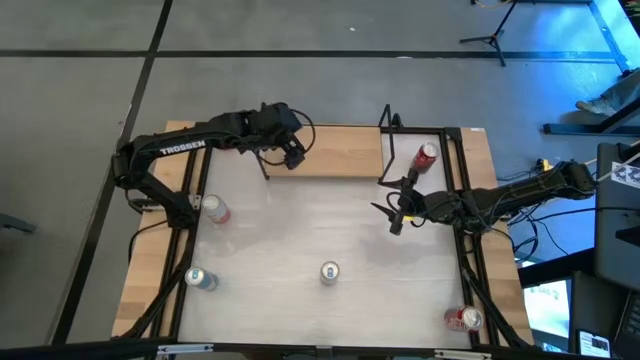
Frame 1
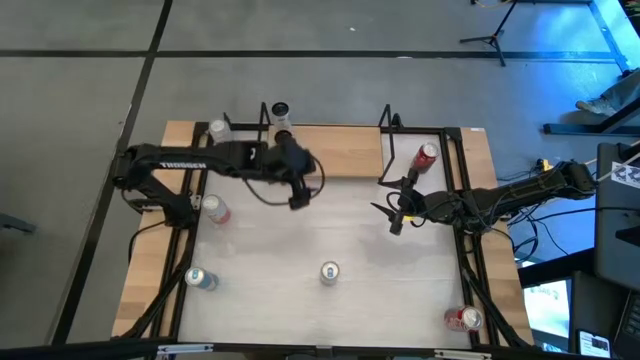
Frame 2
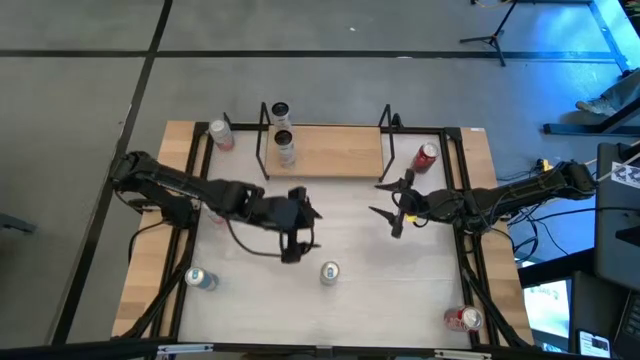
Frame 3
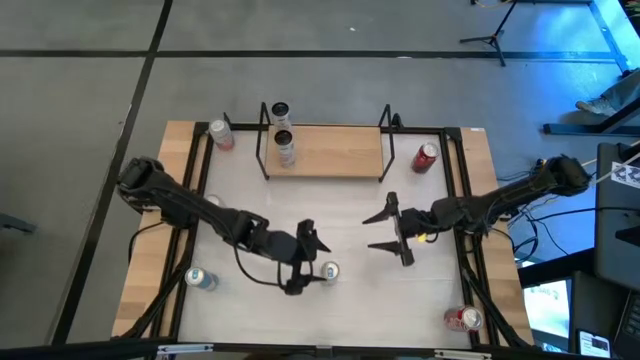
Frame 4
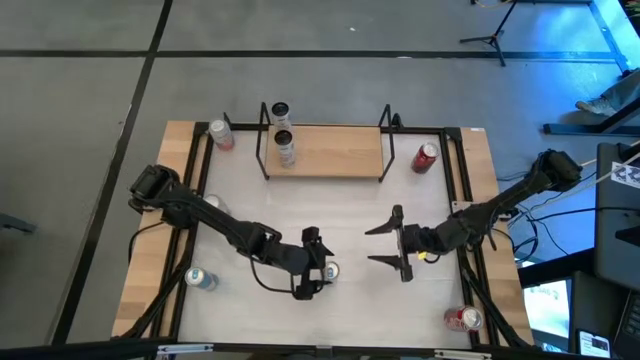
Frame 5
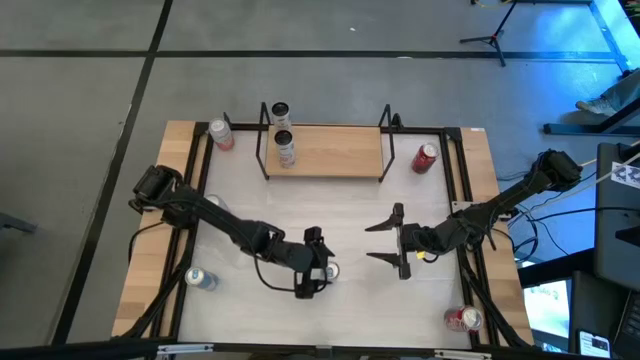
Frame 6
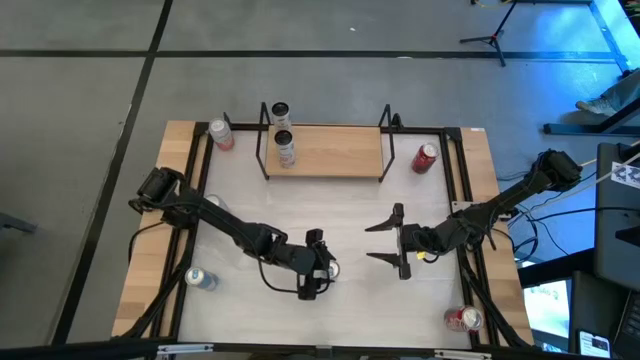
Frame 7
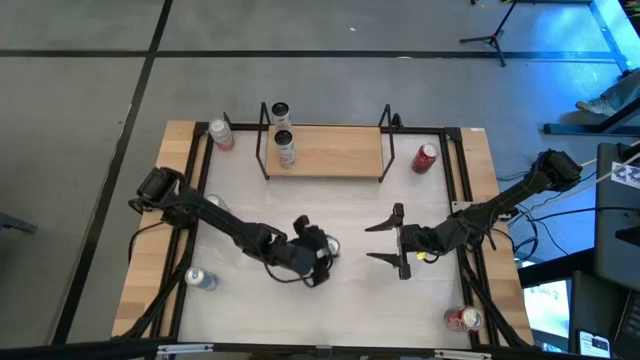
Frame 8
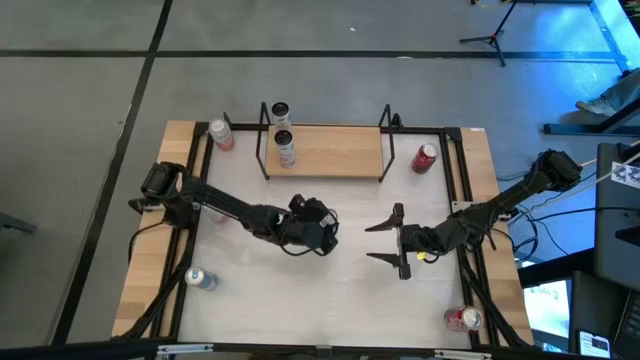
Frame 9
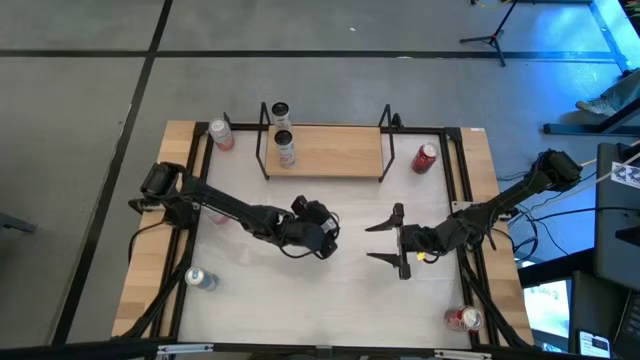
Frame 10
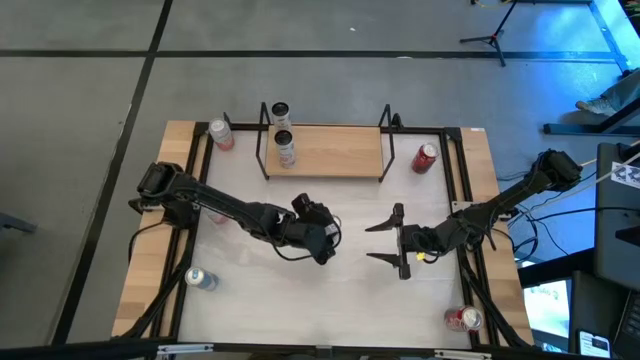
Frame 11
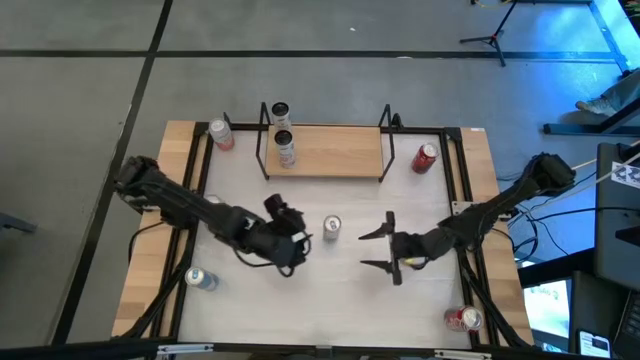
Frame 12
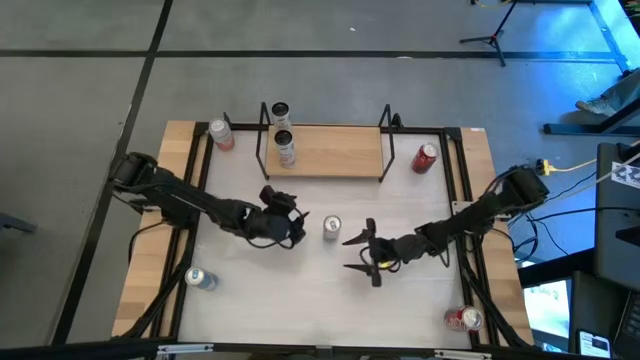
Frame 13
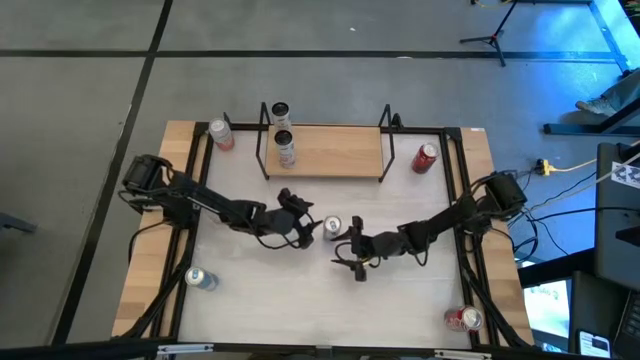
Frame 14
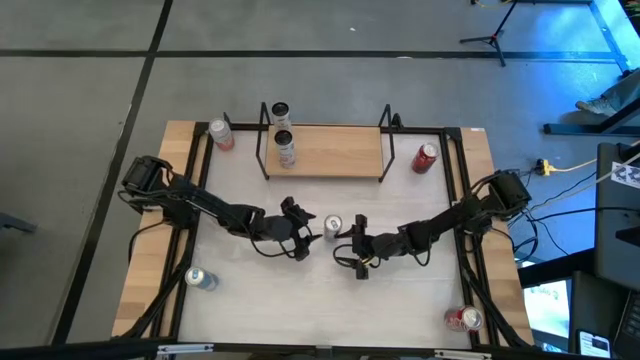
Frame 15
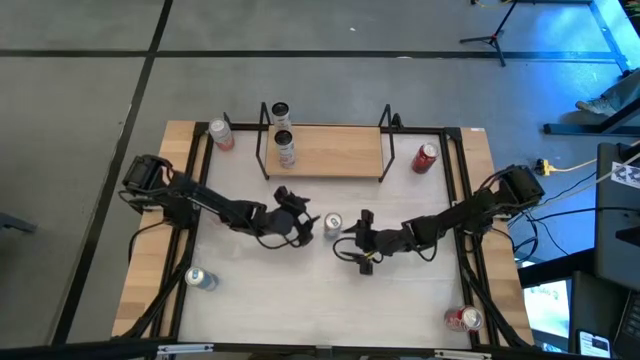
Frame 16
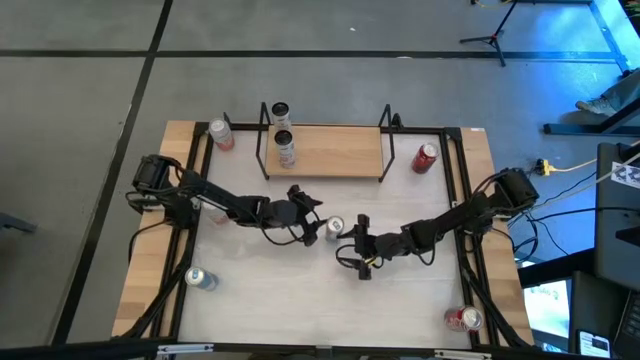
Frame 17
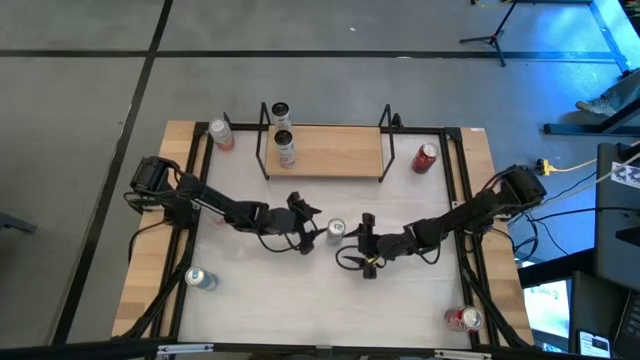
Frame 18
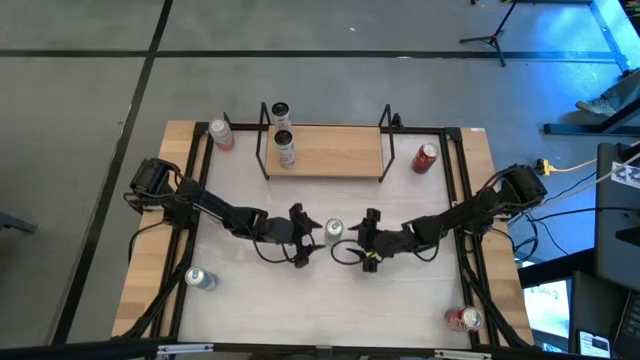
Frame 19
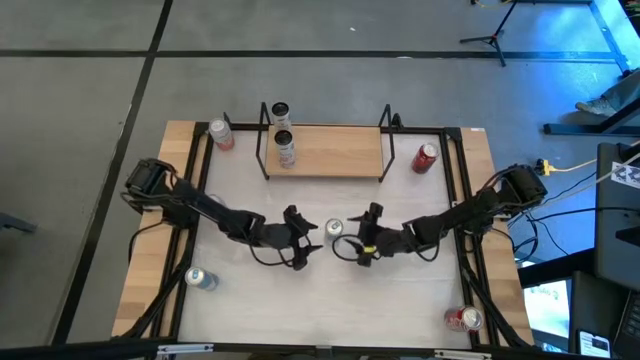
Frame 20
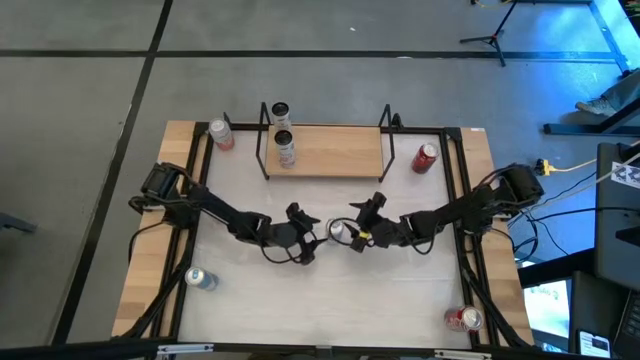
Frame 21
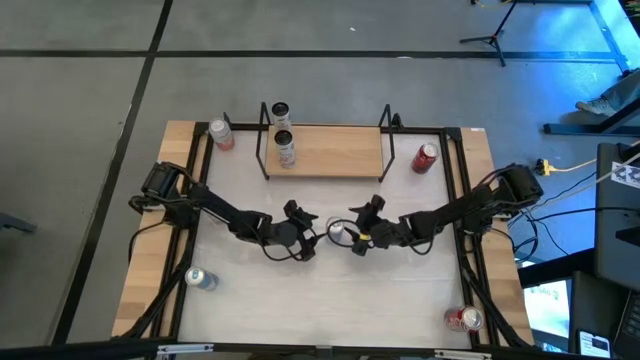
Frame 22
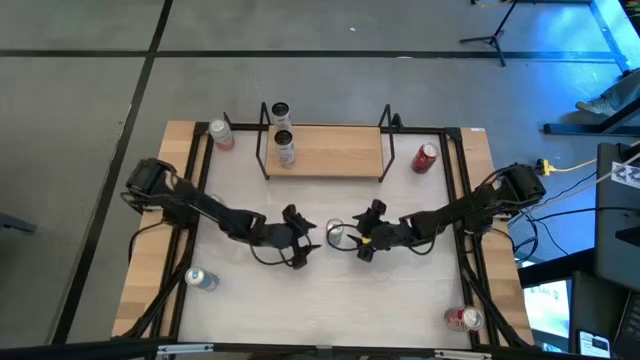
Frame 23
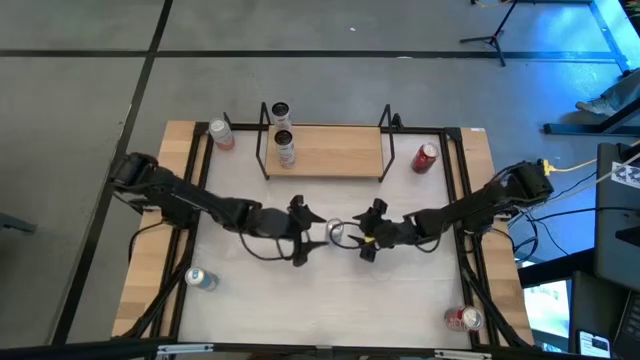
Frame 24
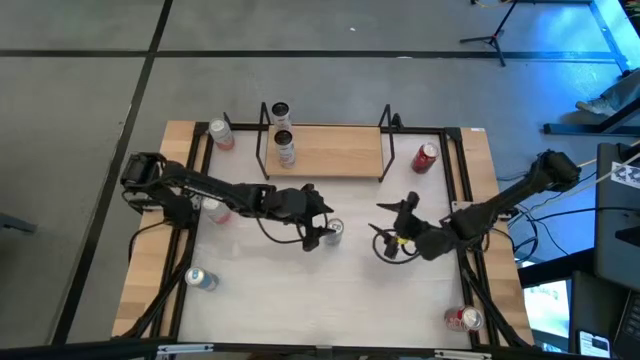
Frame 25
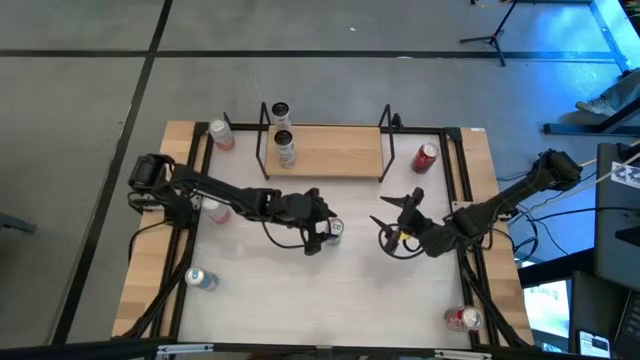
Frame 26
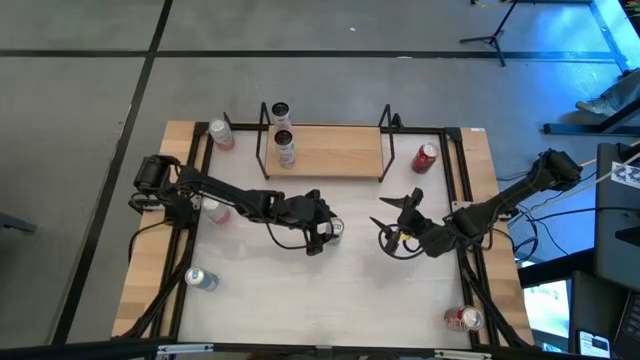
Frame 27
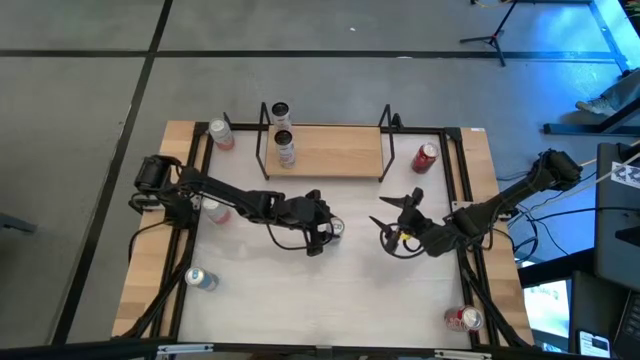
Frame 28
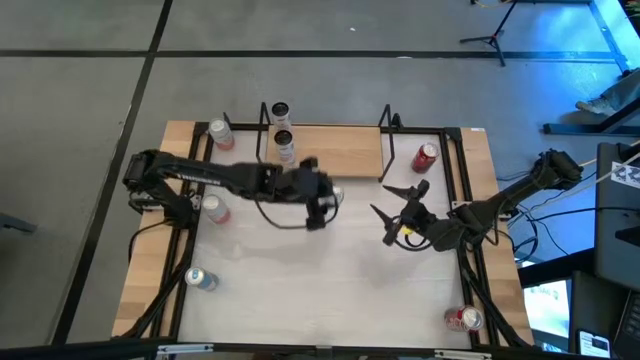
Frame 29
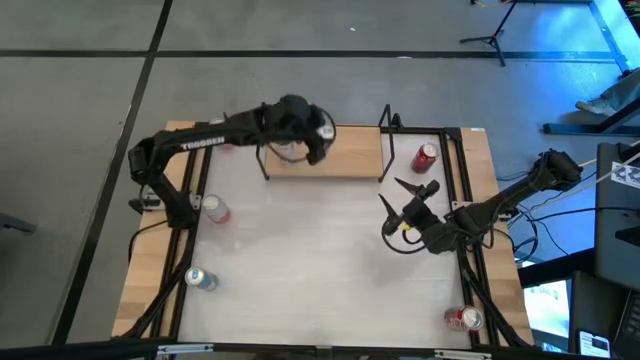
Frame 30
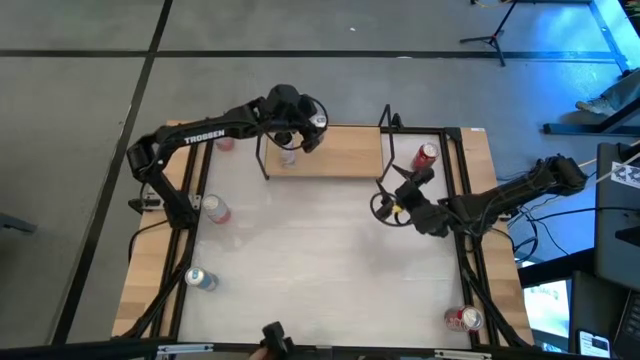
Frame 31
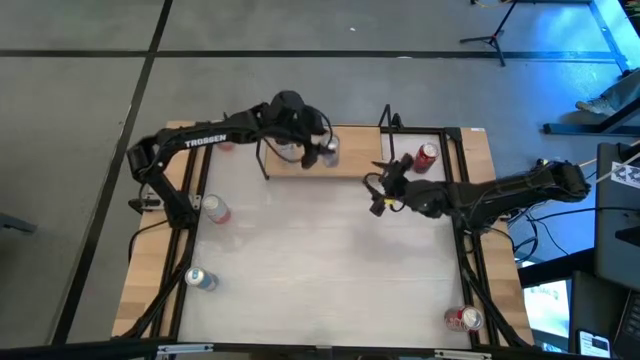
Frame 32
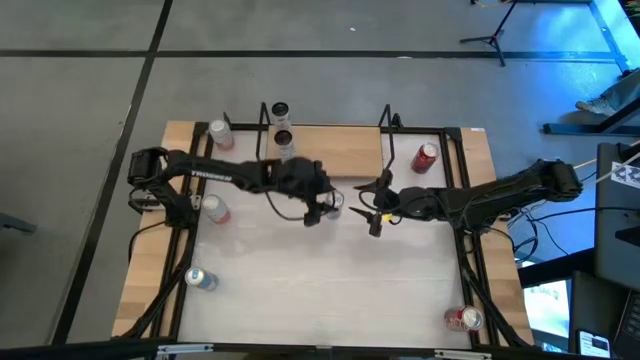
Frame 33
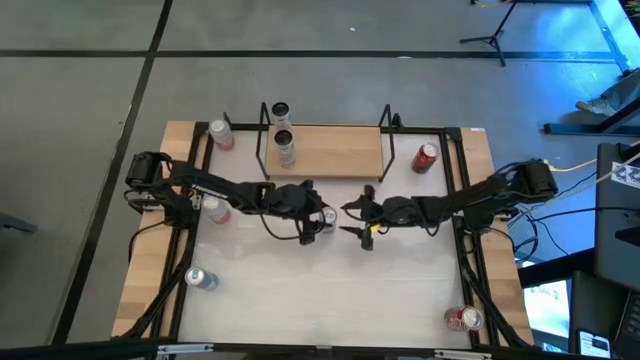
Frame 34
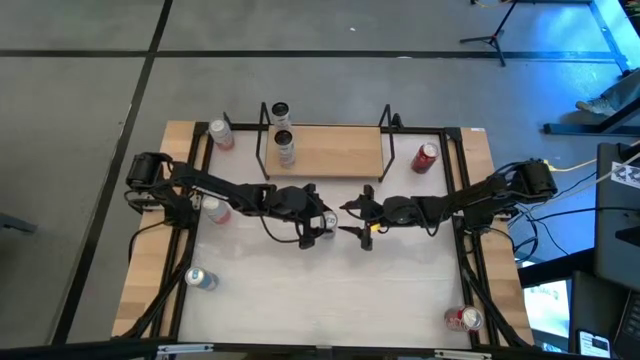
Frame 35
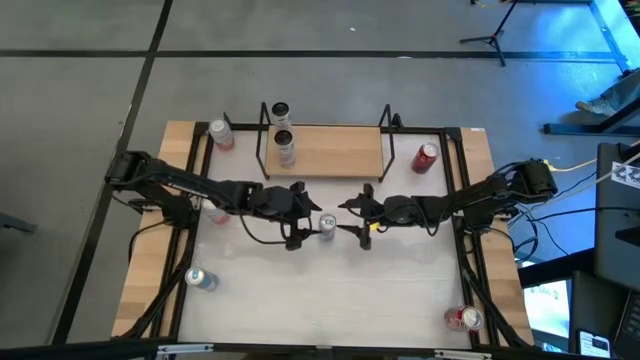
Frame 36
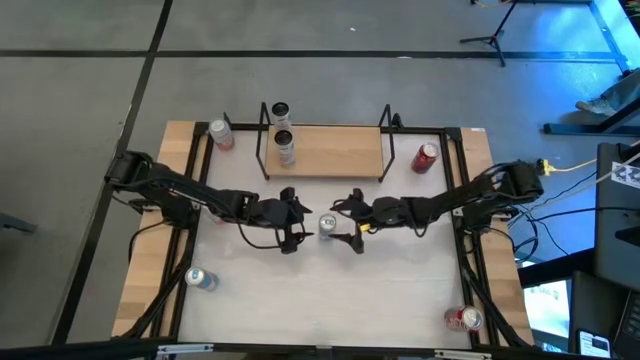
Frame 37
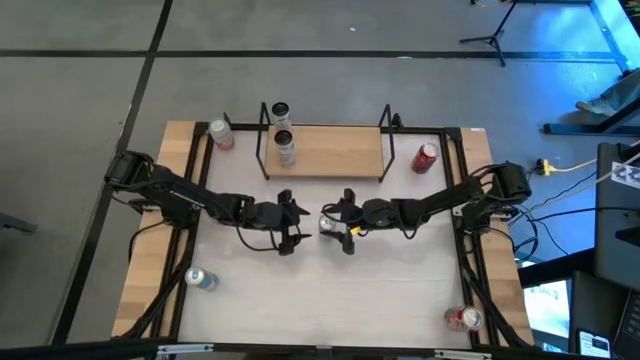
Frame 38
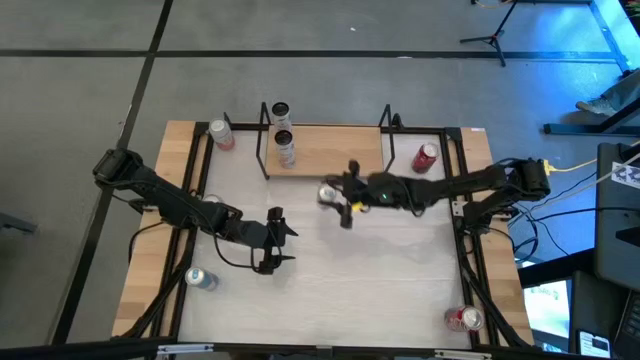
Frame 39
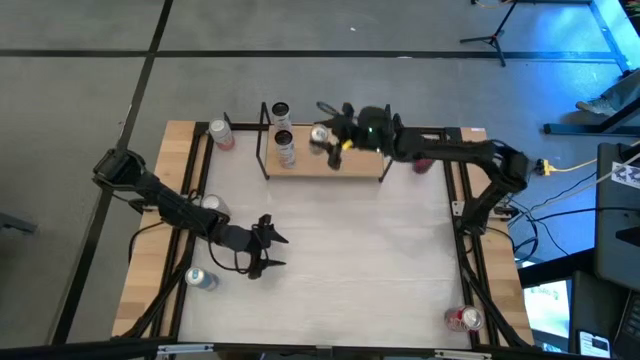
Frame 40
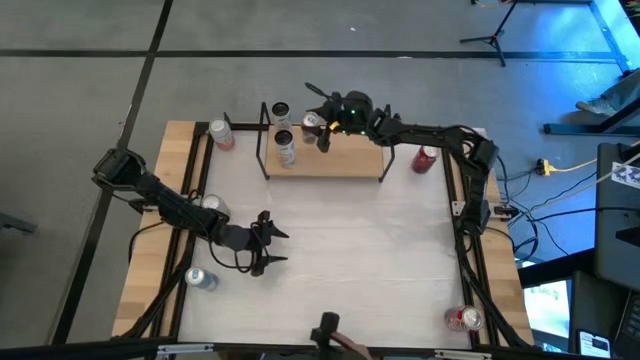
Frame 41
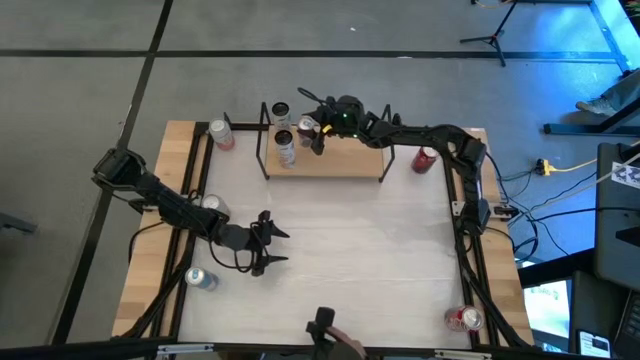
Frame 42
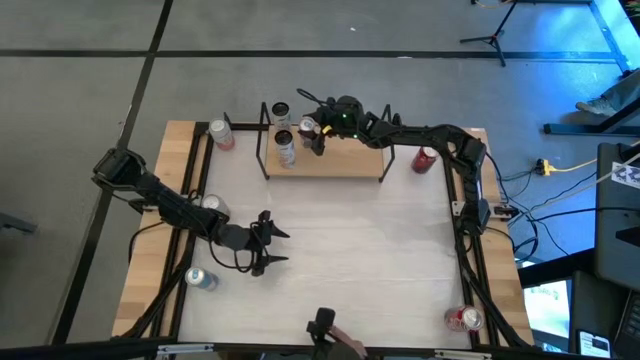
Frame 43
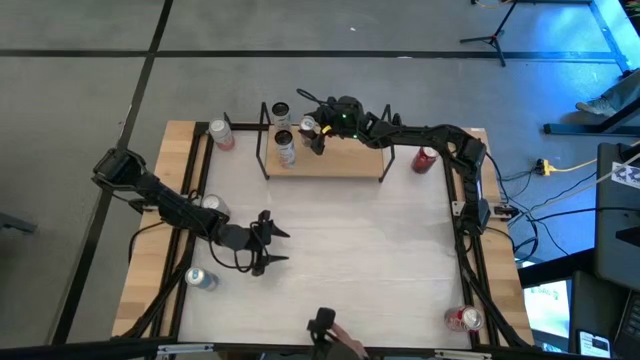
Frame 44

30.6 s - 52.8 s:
Task: Place canned beverage on shelf
Put the right blue soda can on the shelf
